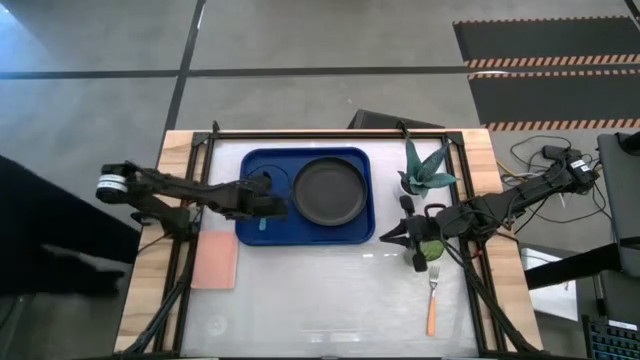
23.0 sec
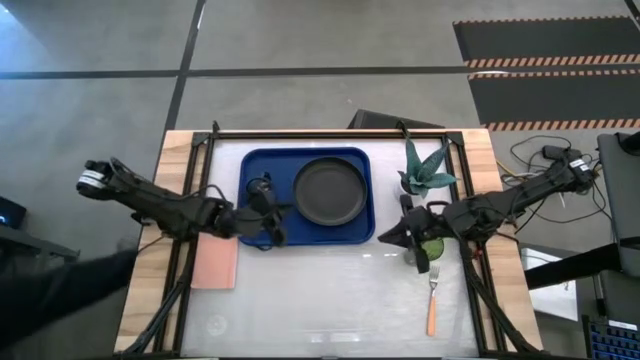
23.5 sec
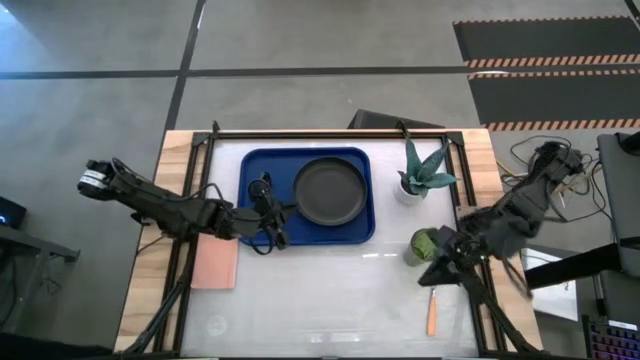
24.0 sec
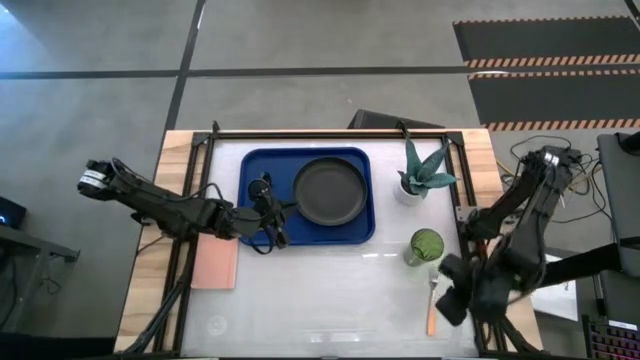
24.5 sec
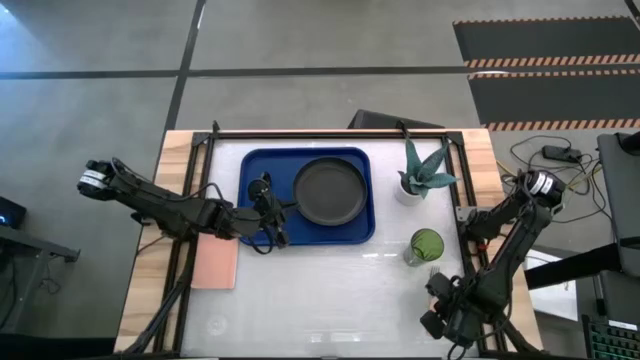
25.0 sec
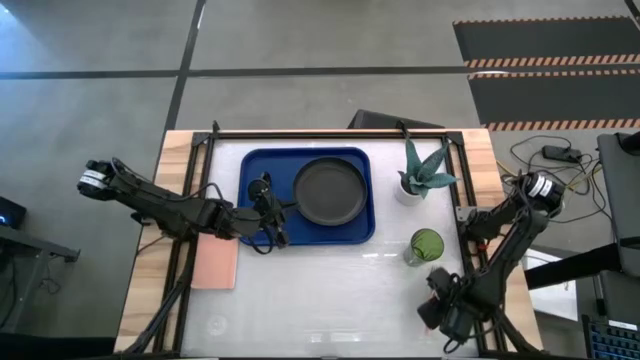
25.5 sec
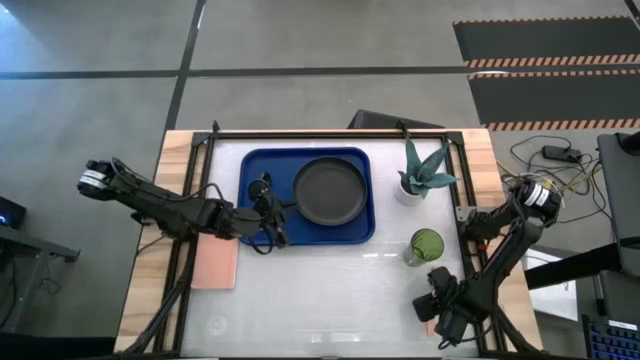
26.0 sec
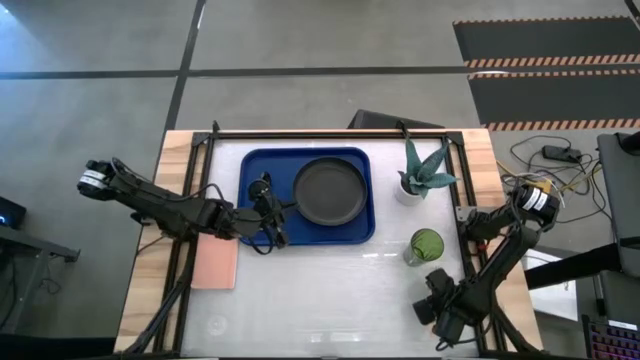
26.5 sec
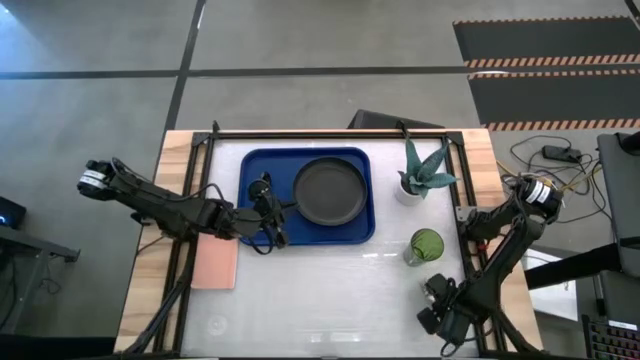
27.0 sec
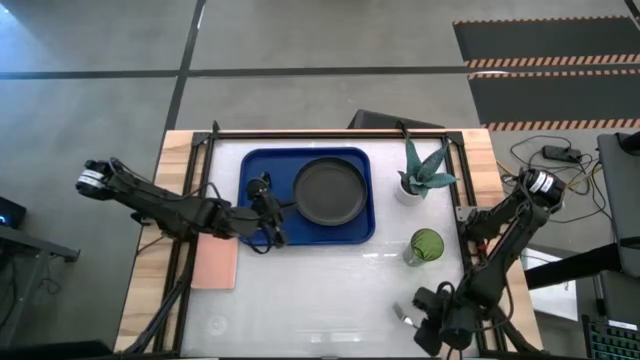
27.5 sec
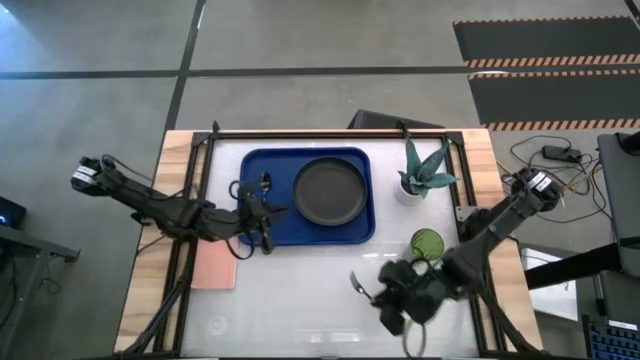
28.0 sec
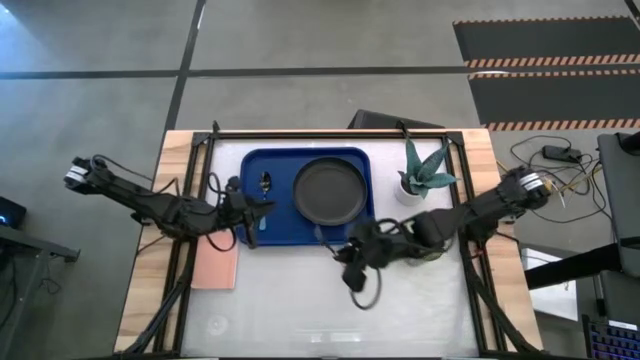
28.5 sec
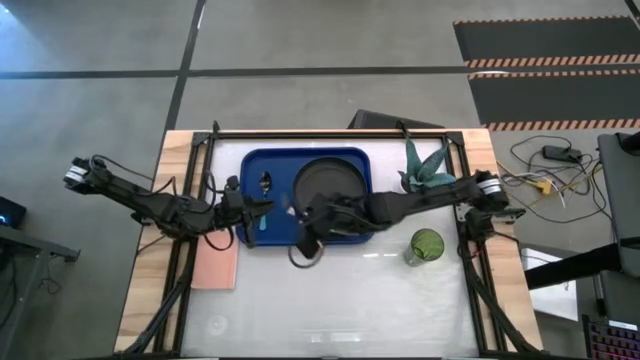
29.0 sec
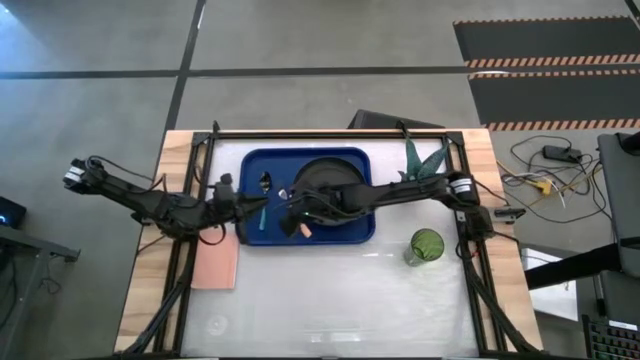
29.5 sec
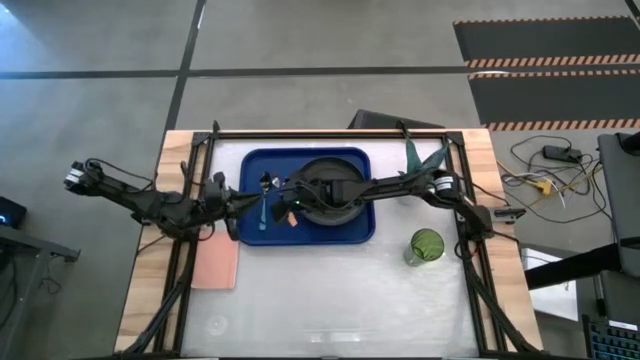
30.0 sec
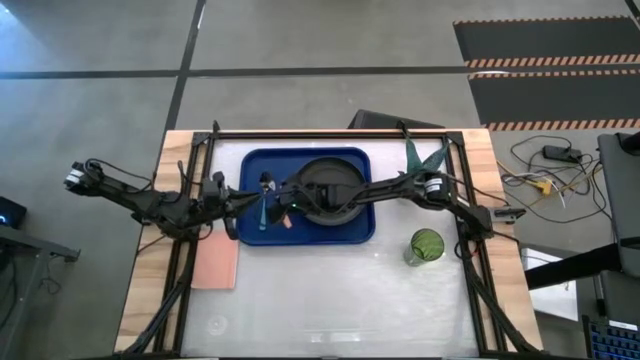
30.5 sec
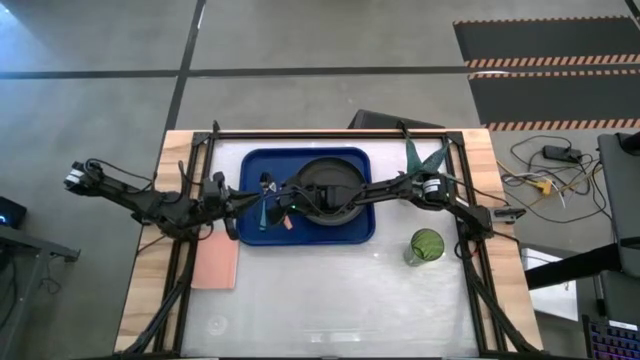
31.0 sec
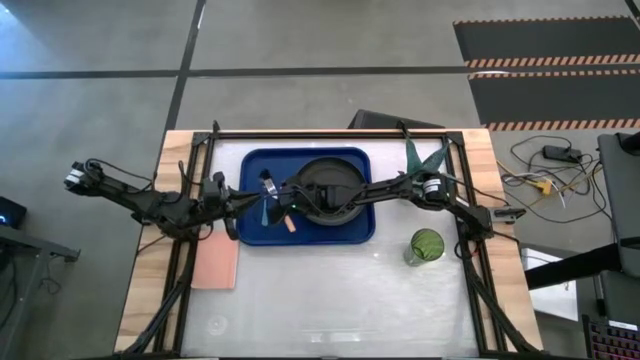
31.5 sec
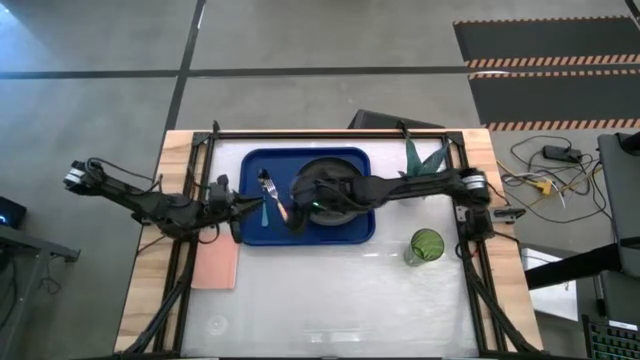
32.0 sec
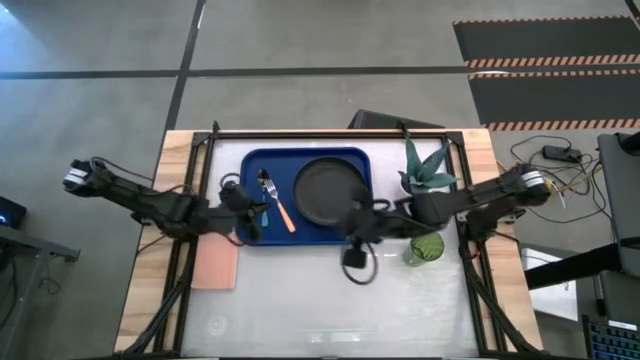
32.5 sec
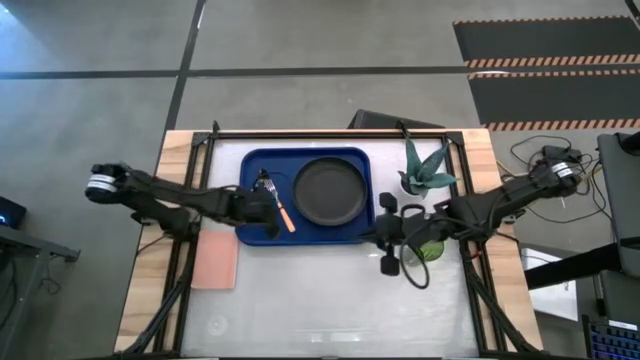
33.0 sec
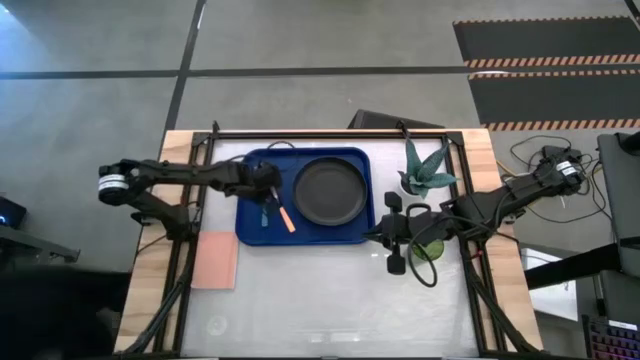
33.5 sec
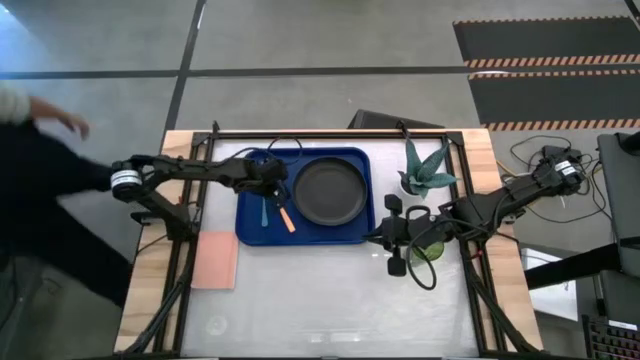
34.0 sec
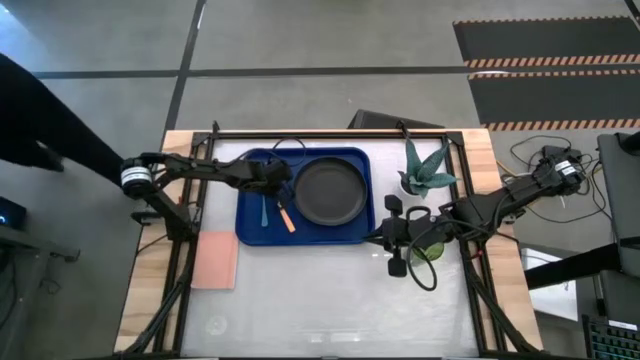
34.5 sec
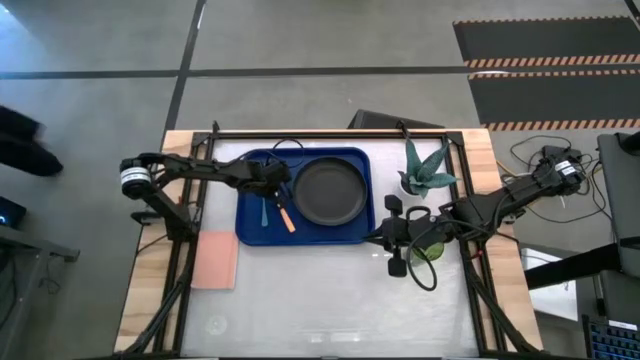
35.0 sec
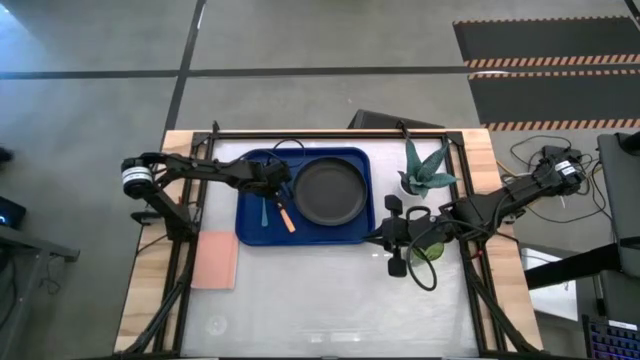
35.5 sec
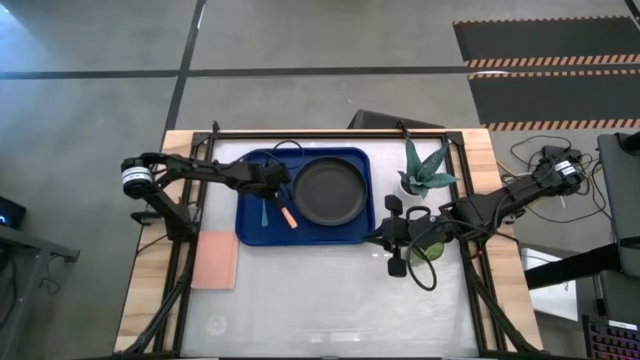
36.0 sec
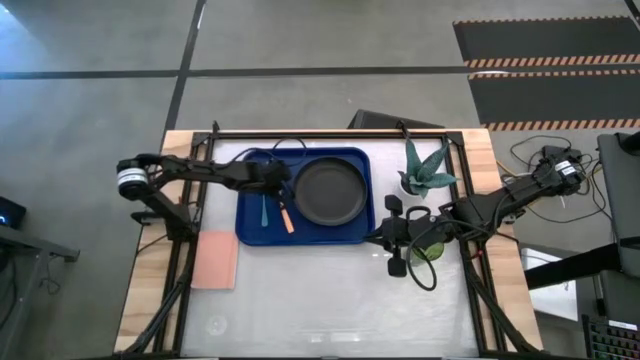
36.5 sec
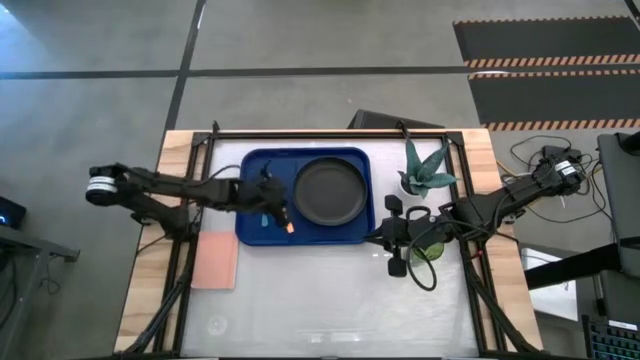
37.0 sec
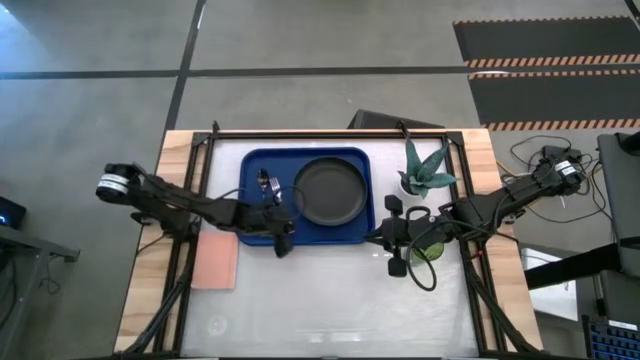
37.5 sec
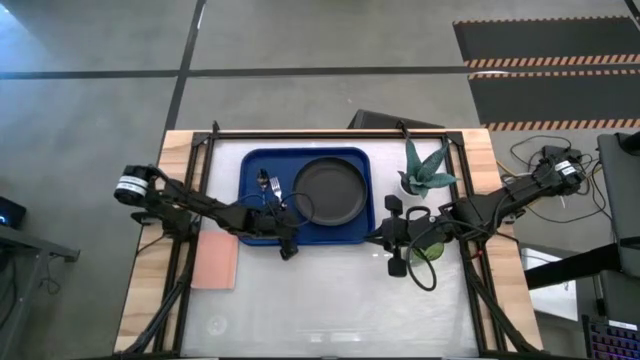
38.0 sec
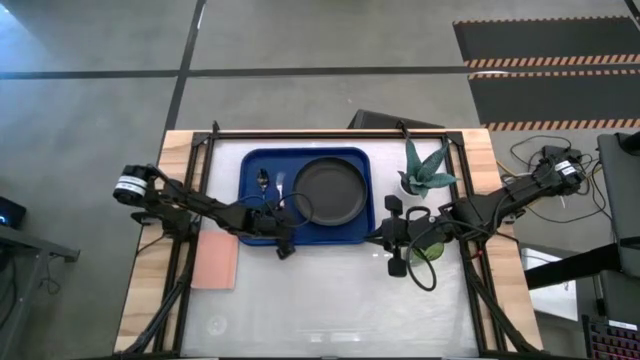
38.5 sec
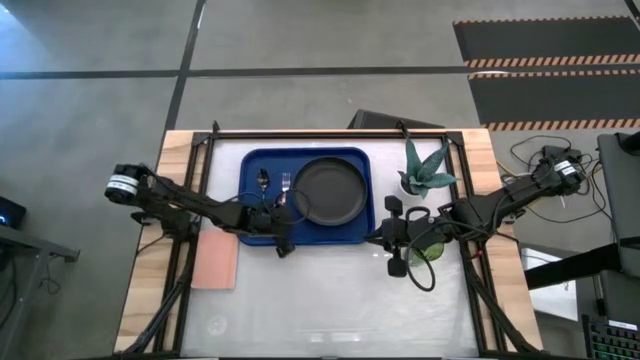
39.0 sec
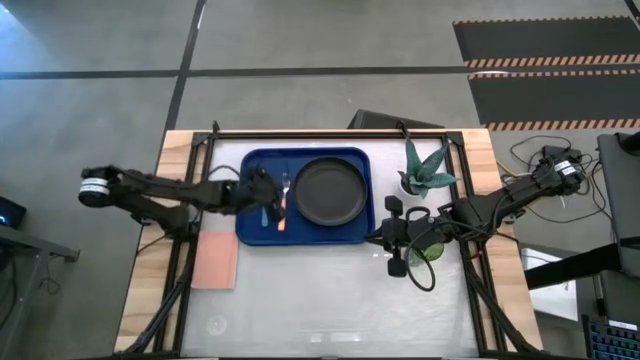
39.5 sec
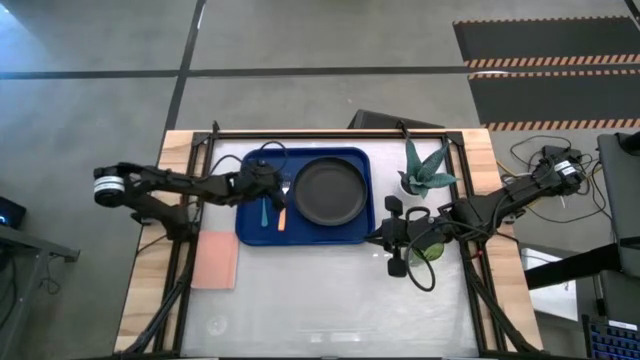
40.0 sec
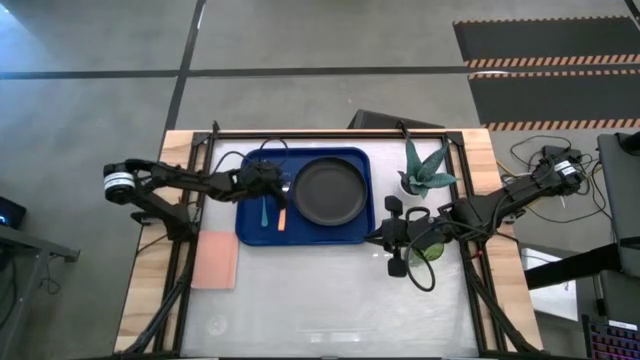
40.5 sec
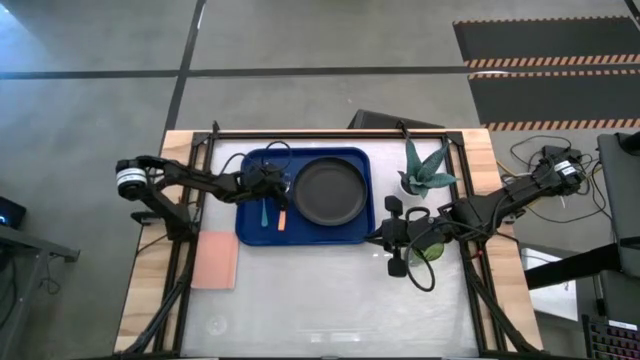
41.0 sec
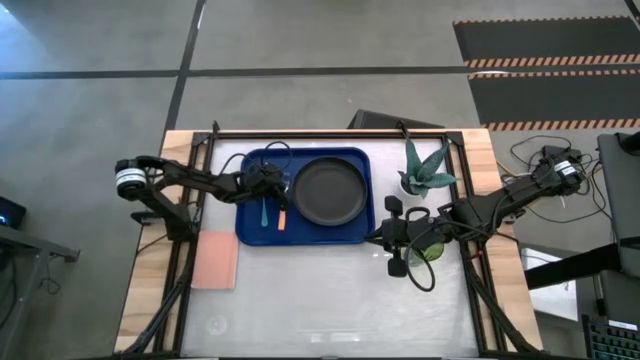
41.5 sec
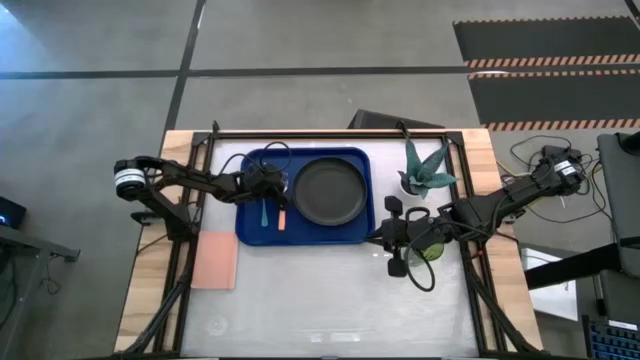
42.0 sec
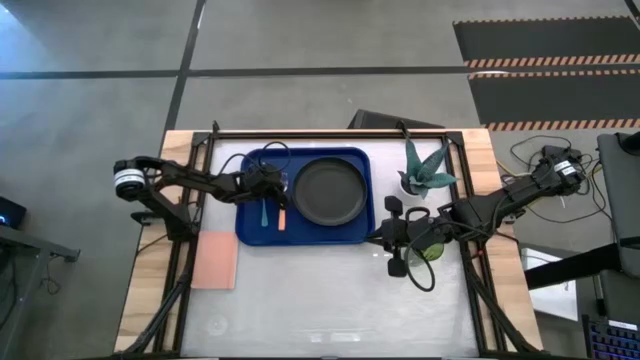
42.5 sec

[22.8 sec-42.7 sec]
Task: Pick and place plate/cup/fork/spoon on tray
Put the orange fork on the blue serving tray to the right of the blue spoon

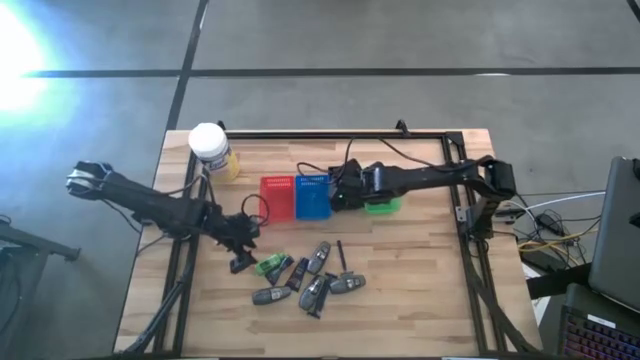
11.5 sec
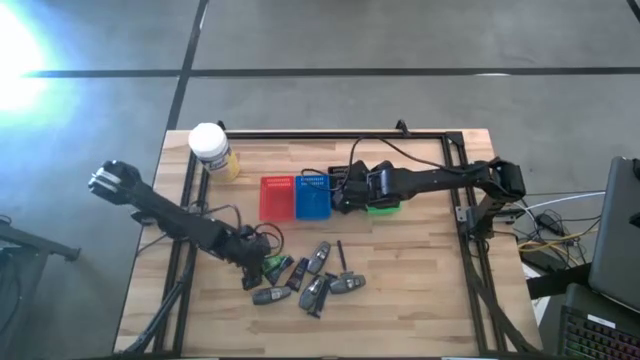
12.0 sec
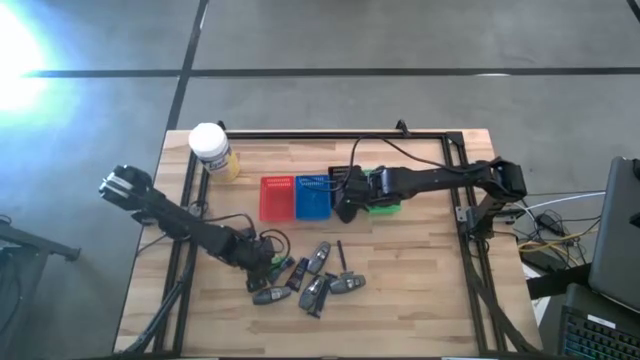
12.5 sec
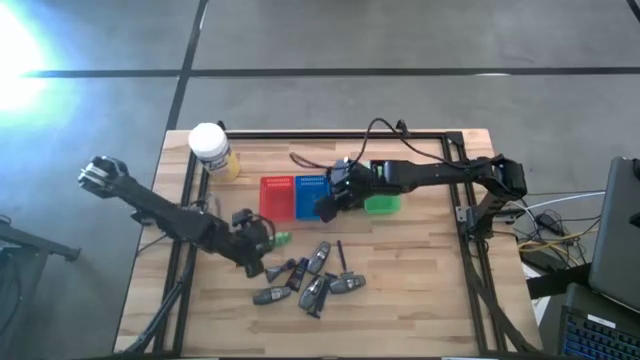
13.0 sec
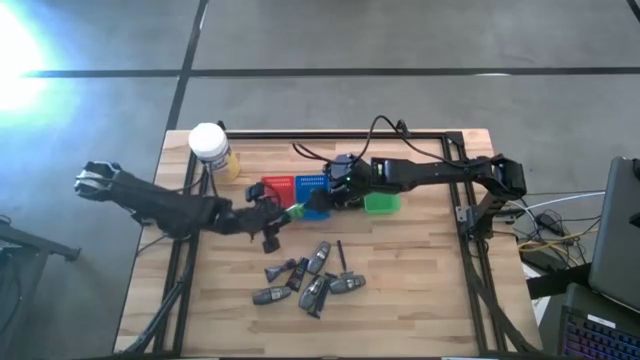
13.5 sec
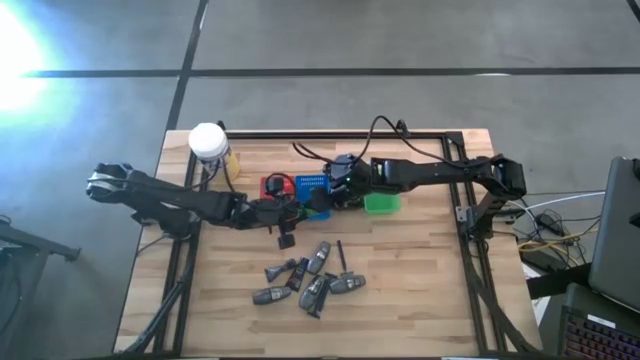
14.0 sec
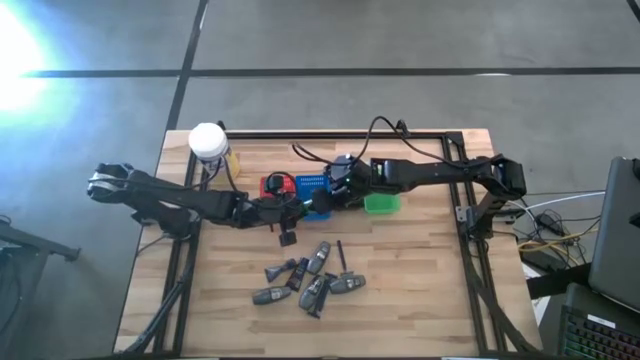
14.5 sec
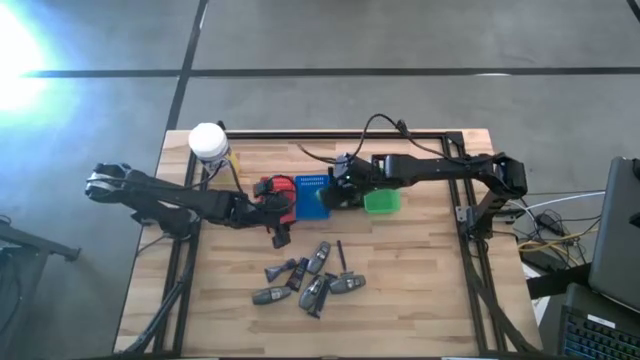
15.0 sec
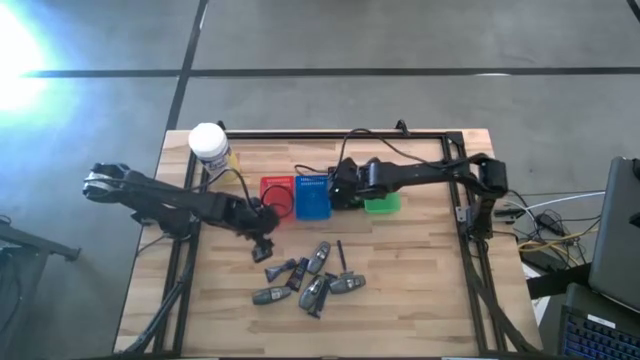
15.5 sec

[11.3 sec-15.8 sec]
Task: Pick & Place Travel size toiletries
Put the green shampoo into the black bin
